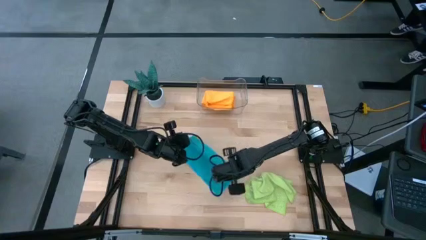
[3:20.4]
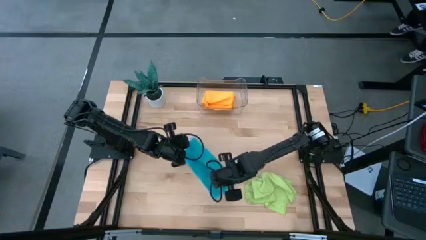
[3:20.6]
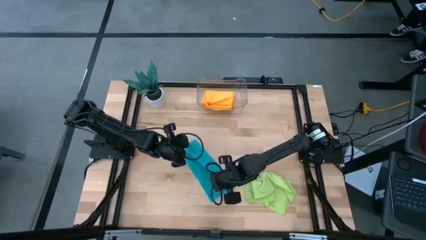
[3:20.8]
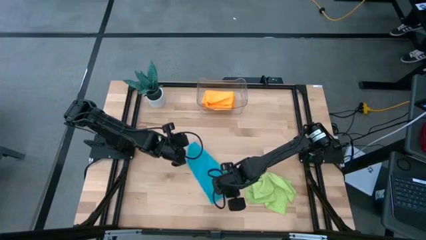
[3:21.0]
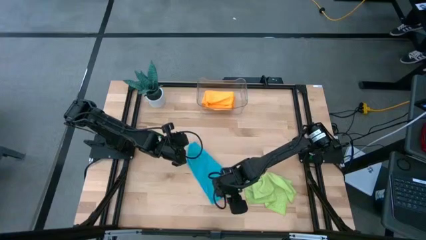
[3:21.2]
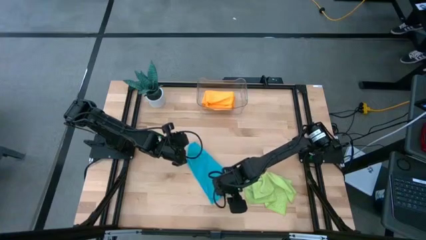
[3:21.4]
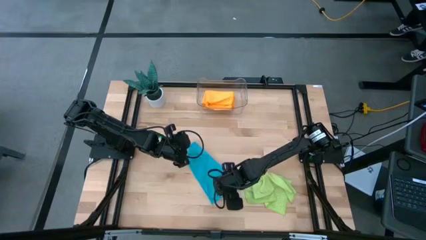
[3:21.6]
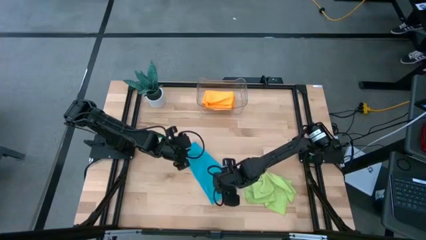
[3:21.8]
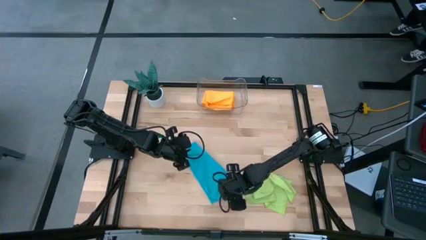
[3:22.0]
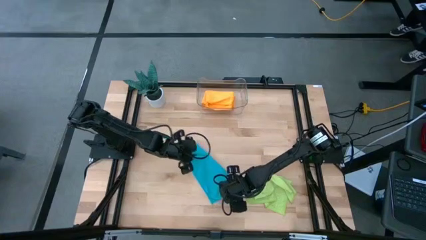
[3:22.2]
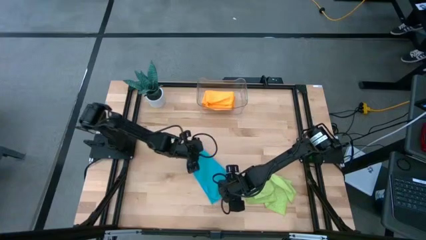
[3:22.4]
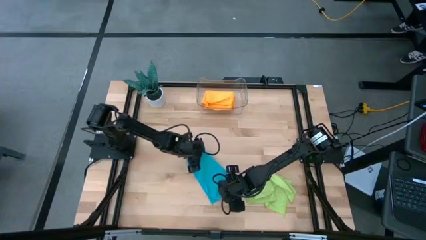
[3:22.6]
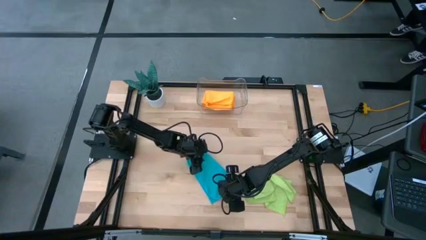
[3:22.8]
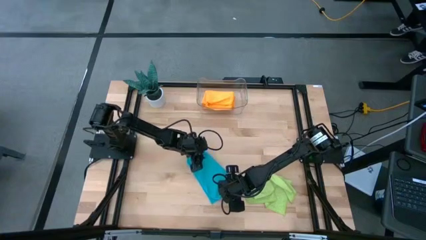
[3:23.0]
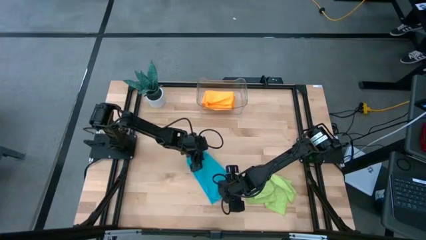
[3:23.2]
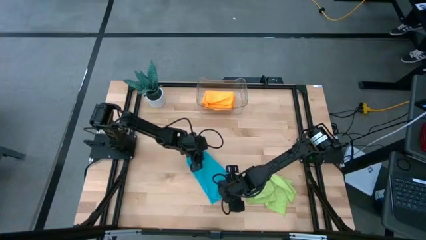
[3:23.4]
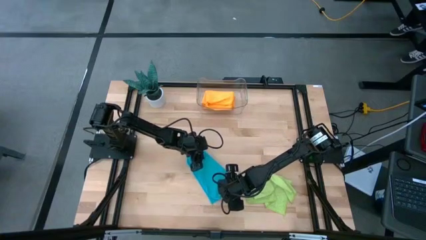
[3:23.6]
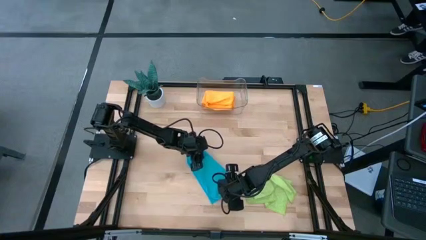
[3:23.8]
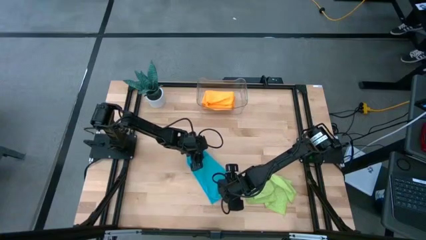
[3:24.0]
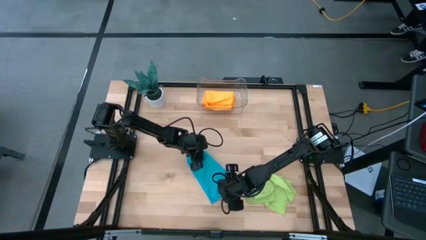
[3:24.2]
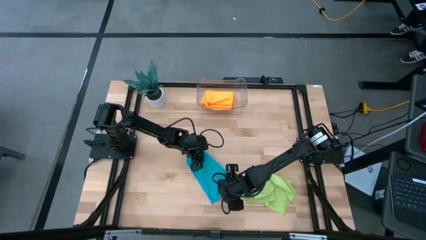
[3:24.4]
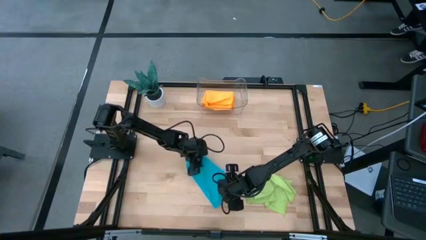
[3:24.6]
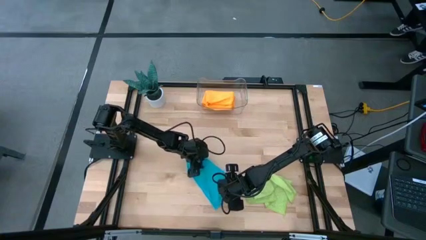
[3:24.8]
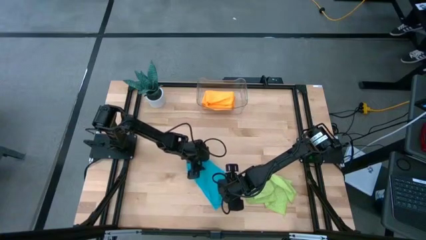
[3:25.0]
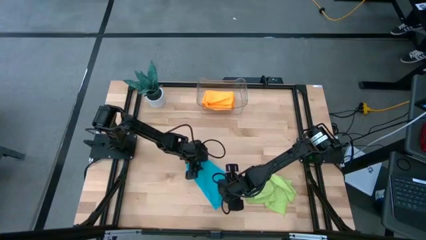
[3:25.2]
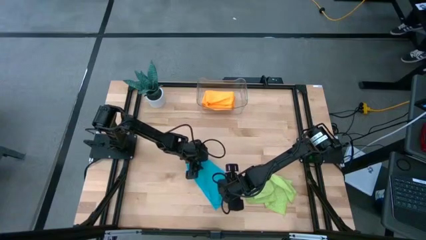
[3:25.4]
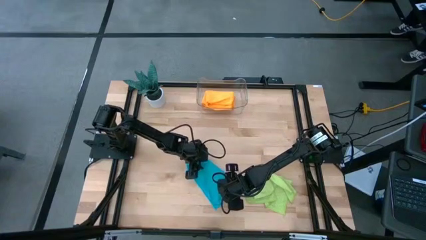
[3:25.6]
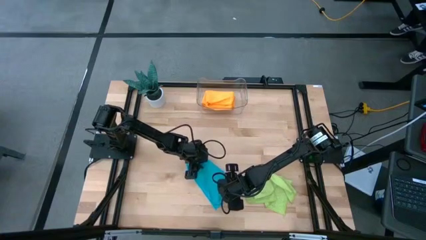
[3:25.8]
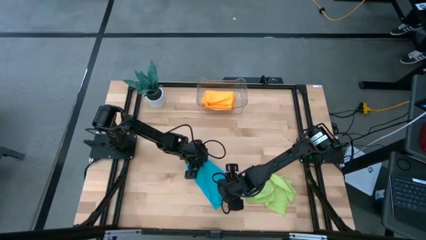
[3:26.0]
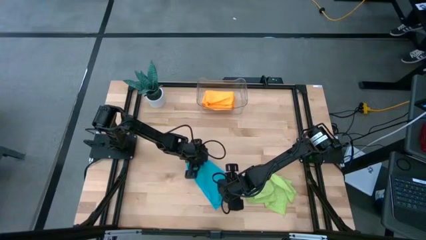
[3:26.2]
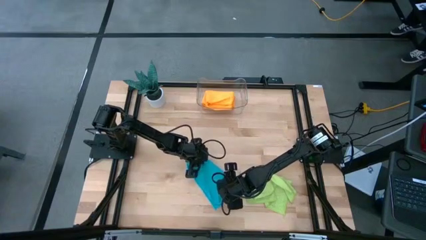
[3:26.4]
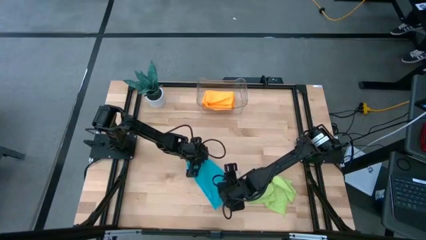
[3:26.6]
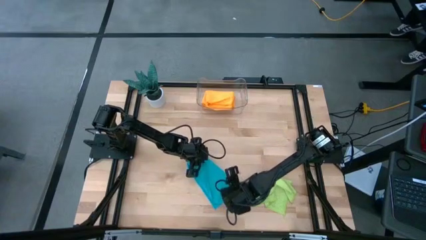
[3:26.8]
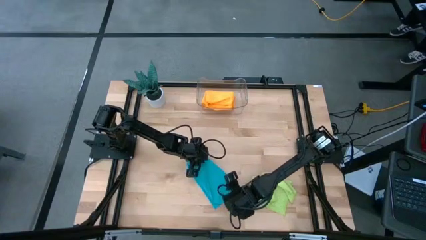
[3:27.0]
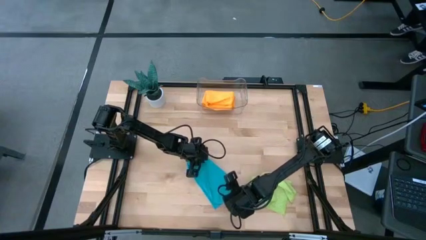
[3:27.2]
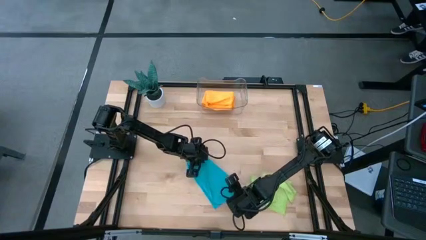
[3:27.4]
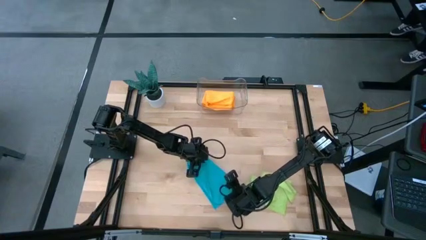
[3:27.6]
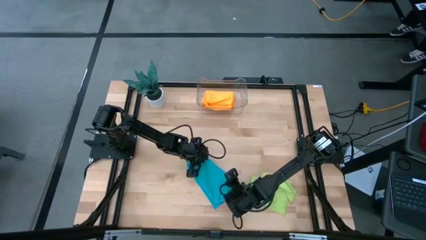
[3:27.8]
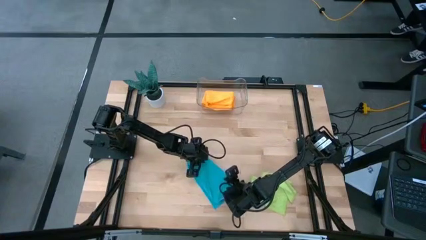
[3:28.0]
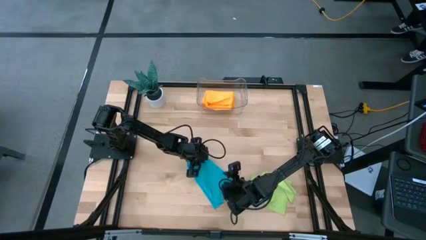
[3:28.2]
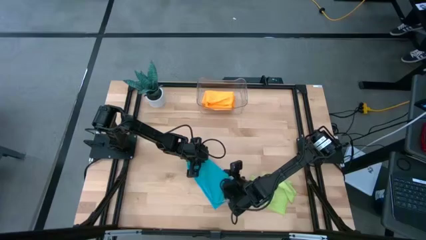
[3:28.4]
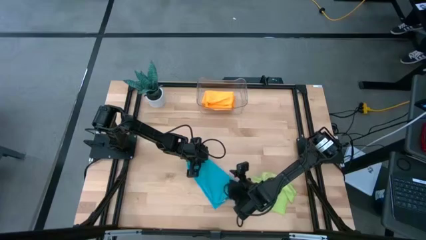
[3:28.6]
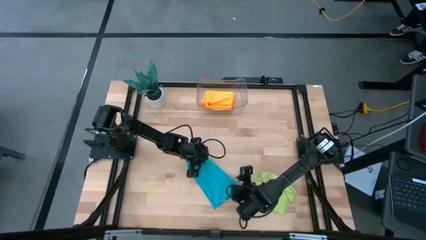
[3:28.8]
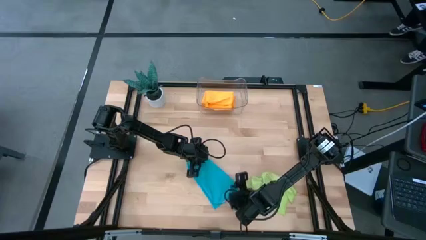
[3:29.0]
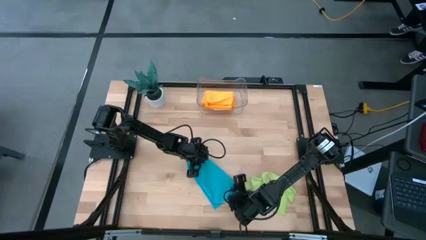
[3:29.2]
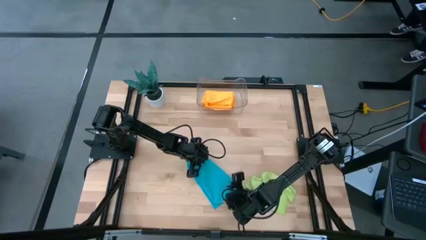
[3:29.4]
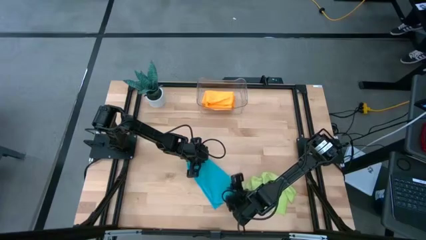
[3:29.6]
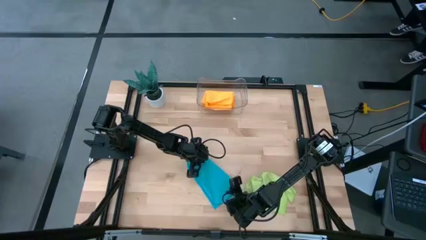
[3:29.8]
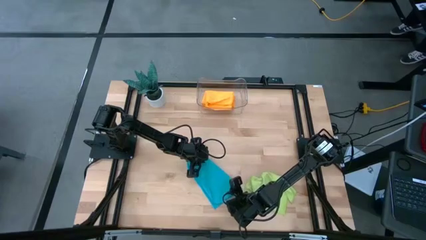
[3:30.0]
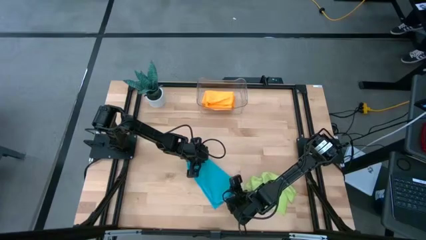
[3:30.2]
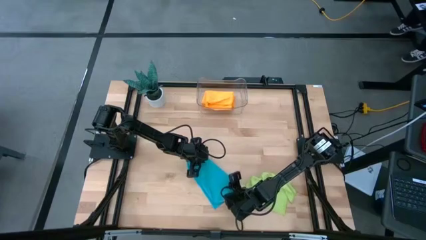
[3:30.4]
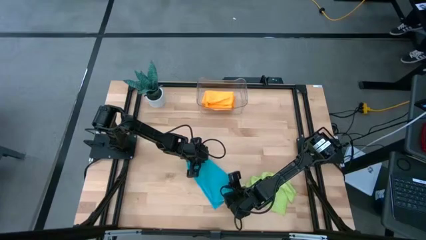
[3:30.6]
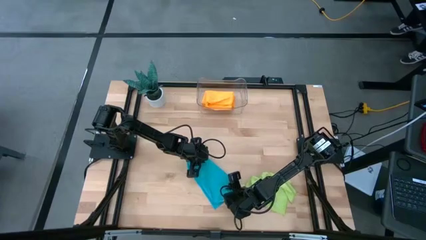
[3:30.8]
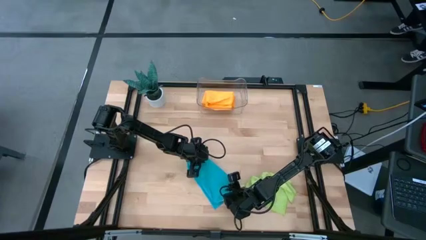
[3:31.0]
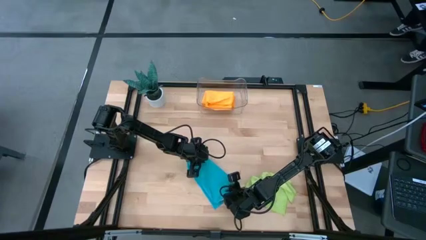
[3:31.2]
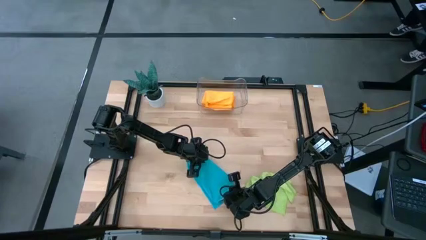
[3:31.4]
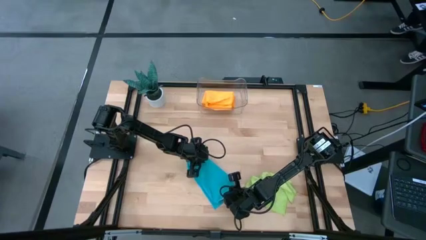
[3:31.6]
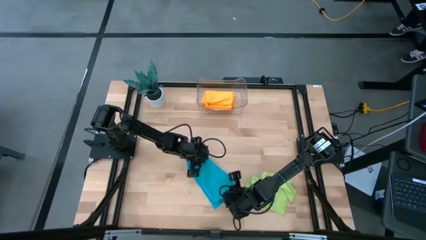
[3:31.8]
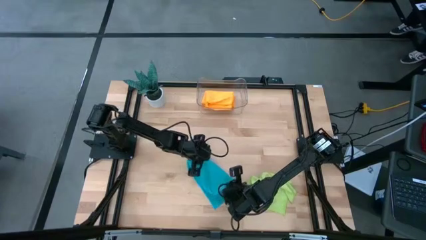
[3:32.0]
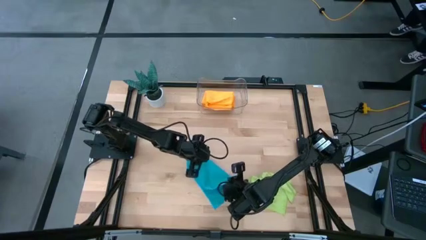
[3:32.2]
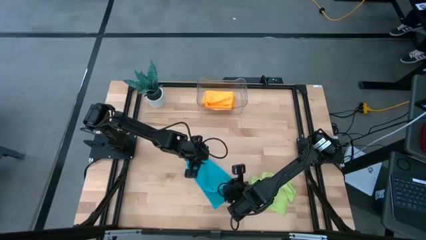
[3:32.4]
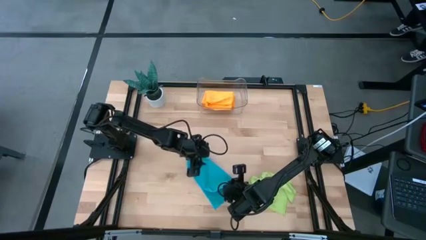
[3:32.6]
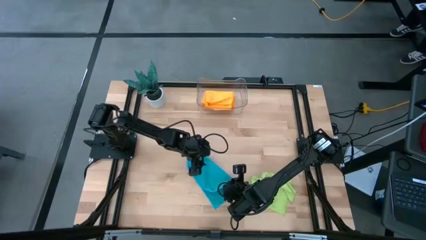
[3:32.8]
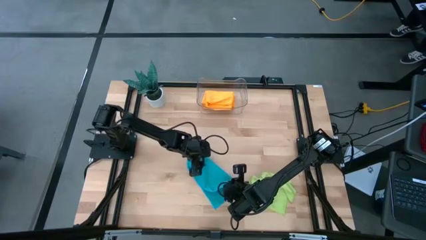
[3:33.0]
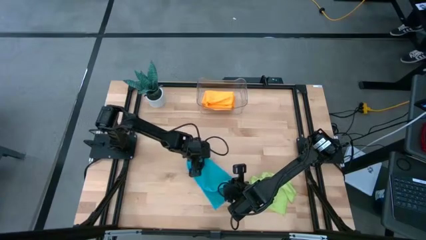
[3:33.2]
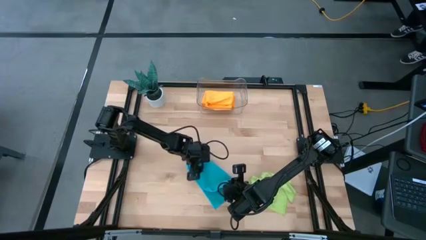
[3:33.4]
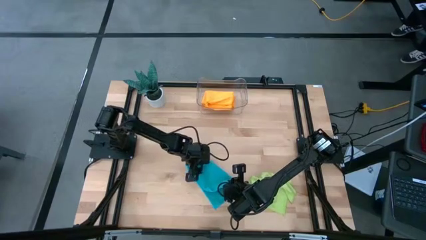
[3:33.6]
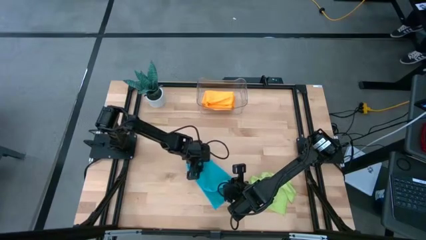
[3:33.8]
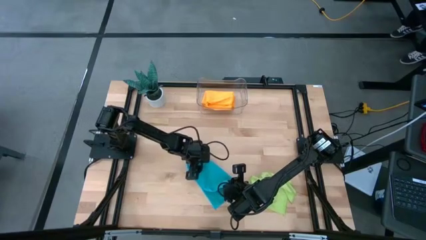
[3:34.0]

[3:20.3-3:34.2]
Task: Fold microfiber towels
Fold the blue microfiber towel

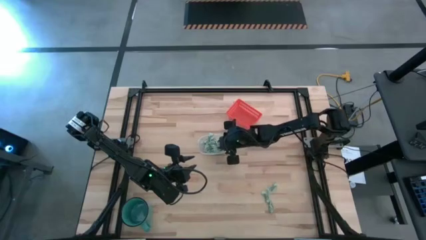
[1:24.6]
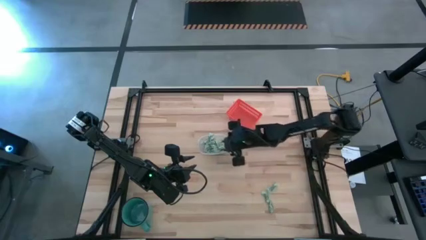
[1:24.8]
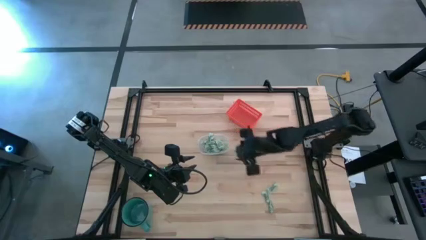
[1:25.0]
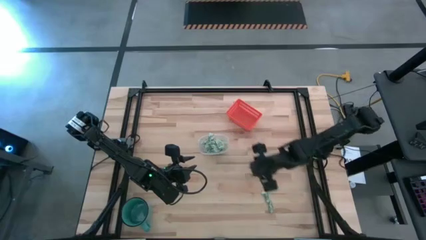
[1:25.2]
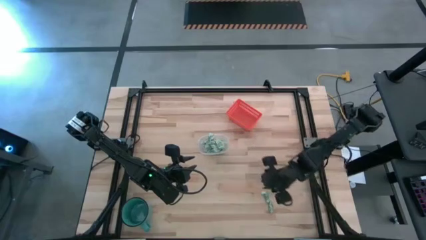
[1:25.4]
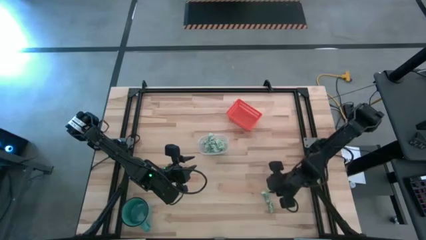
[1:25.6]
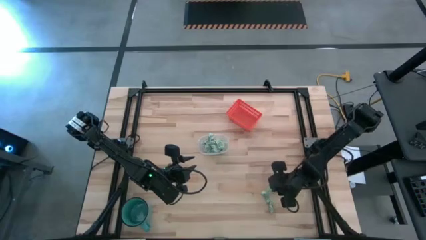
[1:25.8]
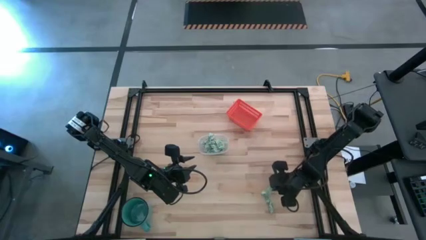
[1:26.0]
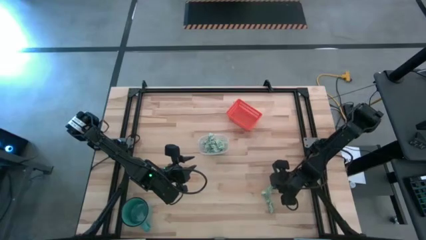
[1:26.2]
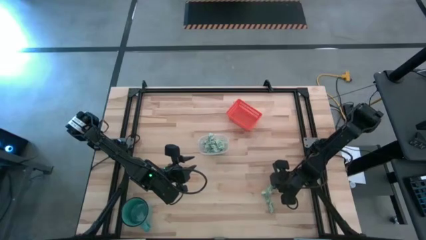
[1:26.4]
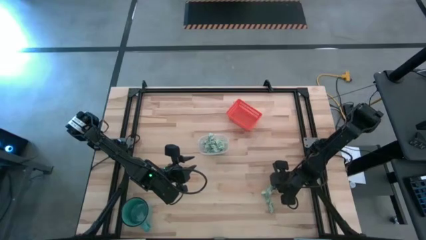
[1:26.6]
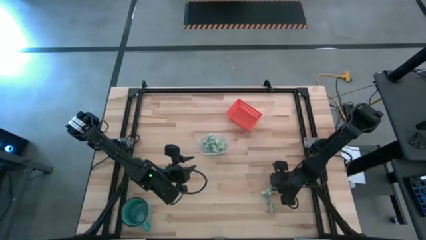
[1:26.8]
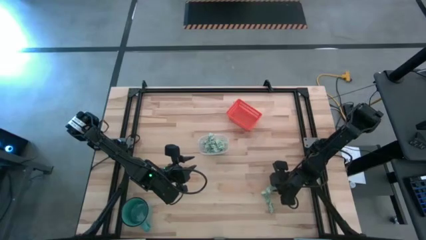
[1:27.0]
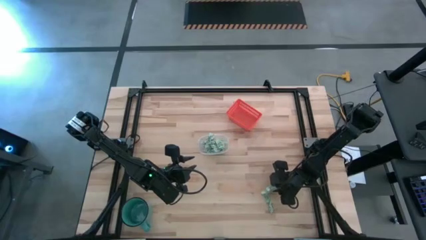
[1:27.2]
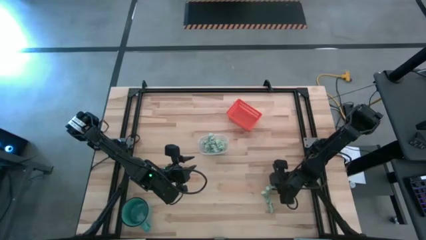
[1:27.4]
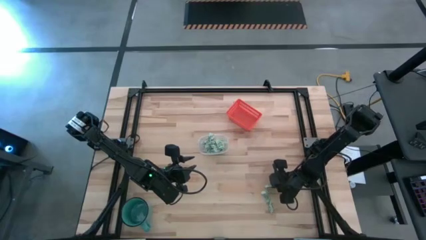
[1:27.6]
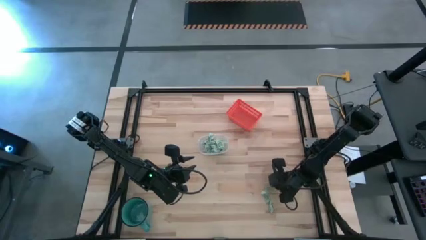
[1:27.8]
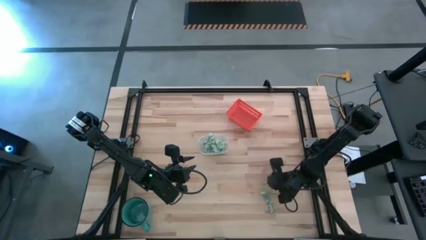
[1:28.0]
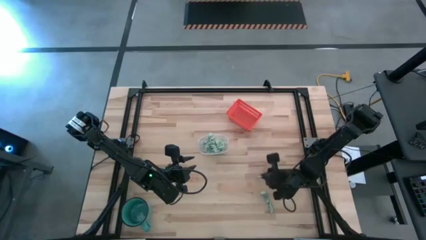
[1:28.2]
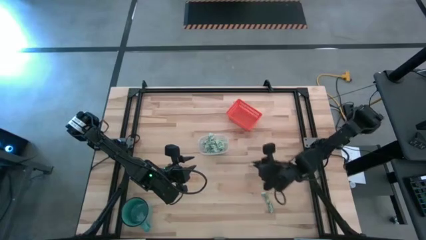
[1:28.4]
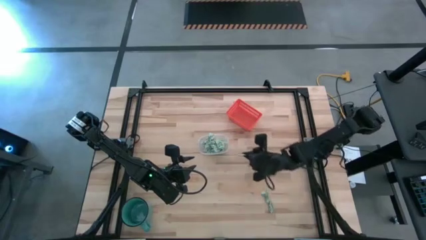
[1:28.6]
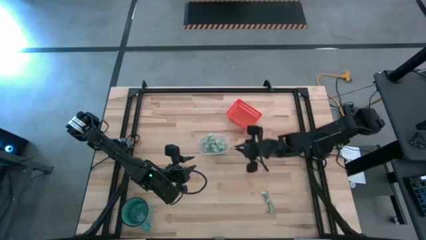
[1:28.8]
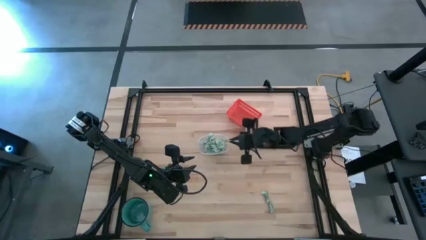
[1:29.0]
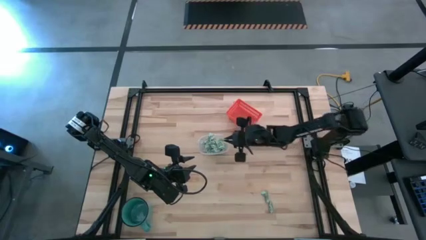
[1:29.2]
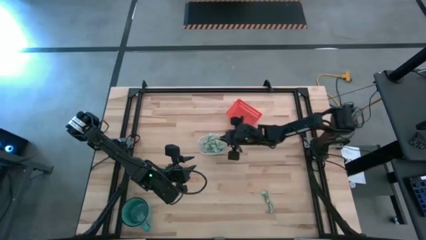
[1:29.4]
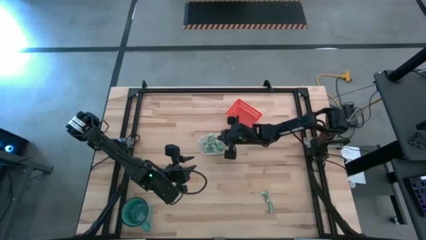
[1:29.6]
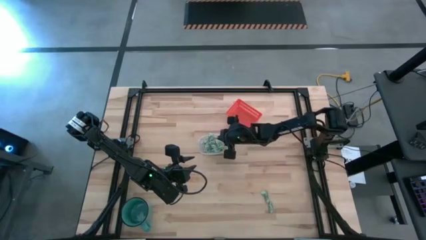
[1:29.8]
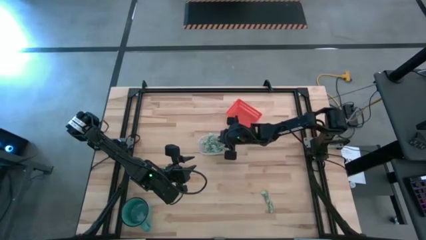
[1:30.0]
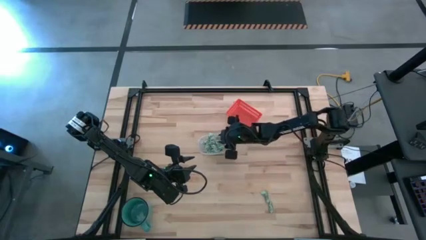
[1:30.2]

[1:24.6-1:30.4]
Task: Pick and place items into bin
Put the stevia packet into the transparent bin
